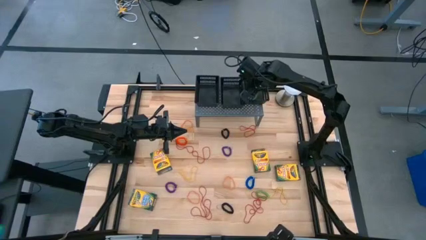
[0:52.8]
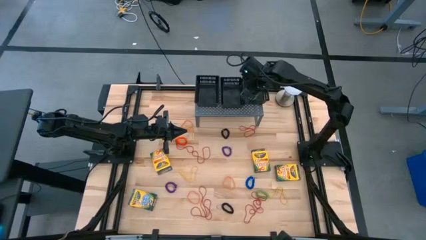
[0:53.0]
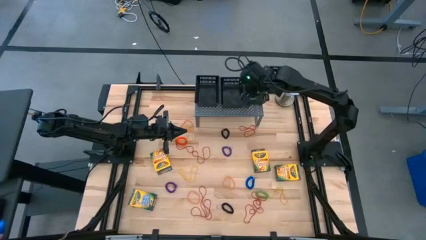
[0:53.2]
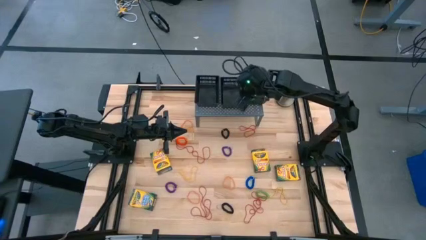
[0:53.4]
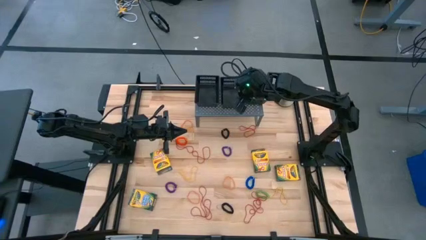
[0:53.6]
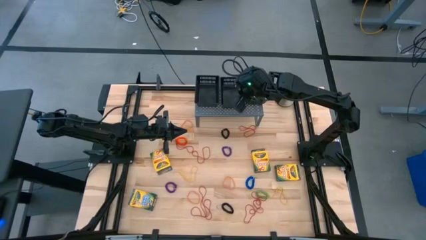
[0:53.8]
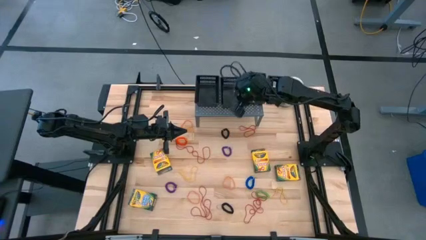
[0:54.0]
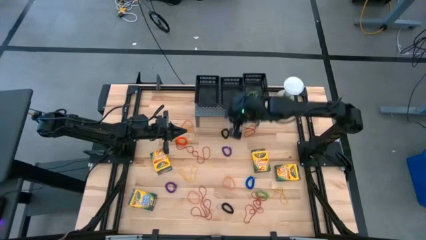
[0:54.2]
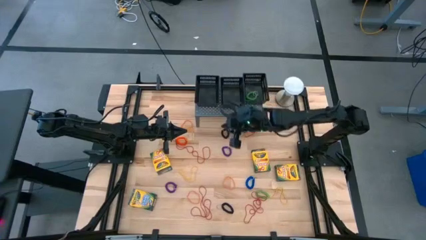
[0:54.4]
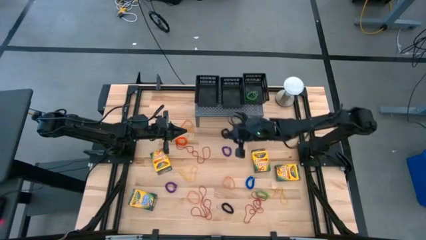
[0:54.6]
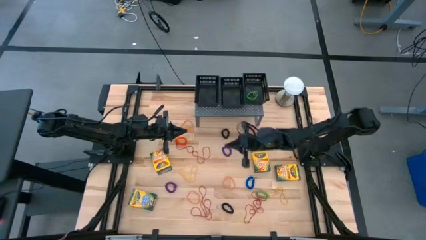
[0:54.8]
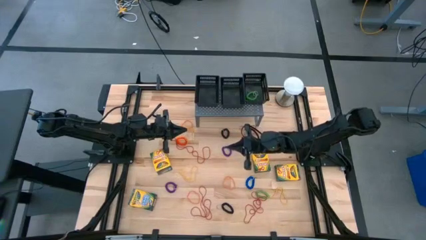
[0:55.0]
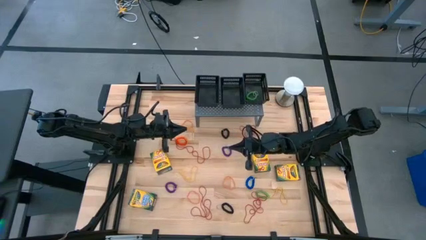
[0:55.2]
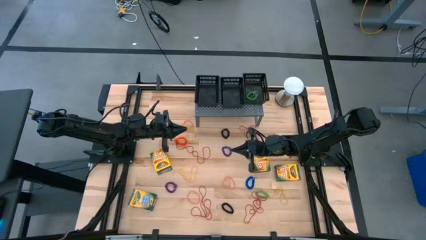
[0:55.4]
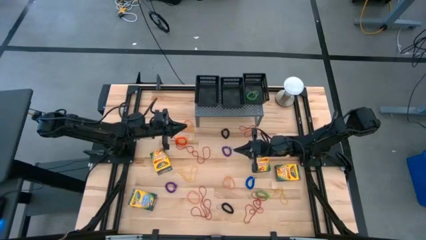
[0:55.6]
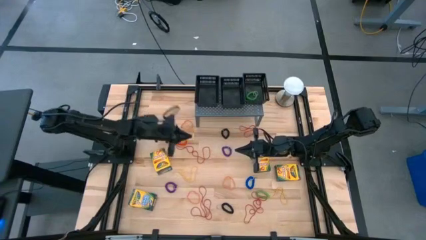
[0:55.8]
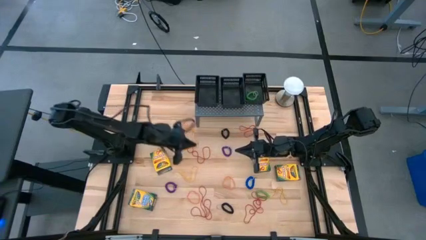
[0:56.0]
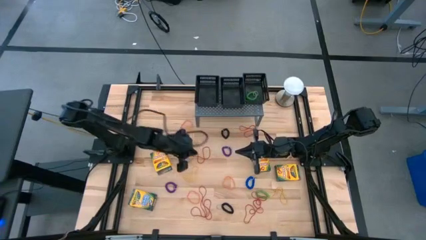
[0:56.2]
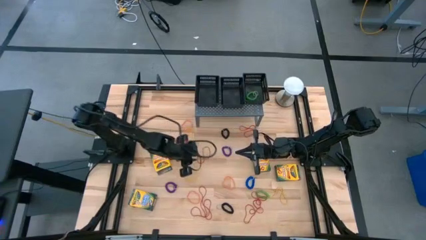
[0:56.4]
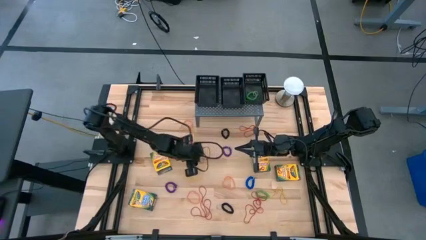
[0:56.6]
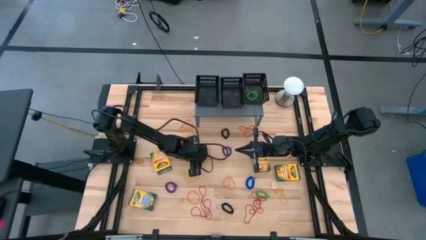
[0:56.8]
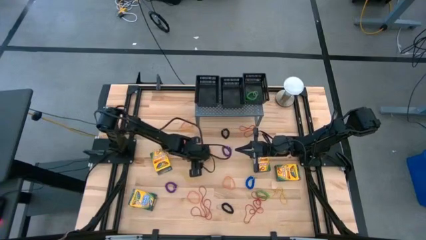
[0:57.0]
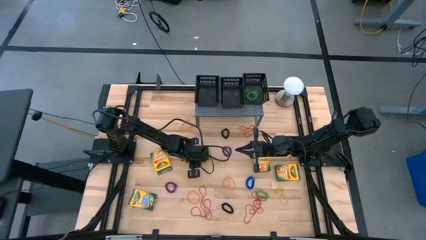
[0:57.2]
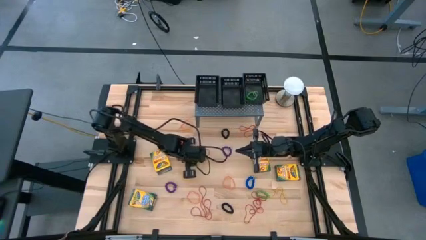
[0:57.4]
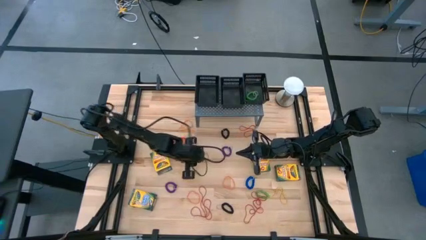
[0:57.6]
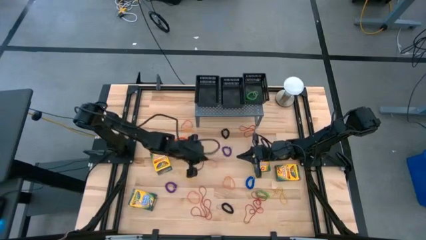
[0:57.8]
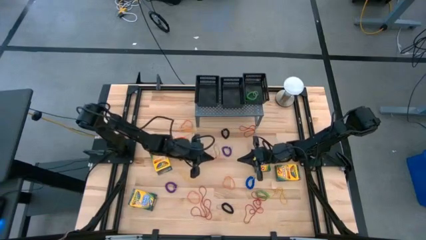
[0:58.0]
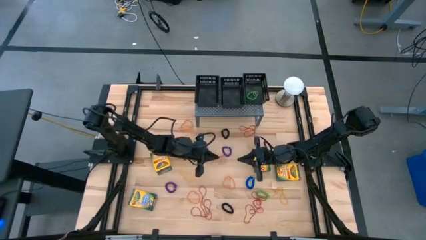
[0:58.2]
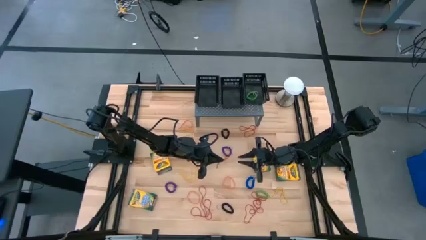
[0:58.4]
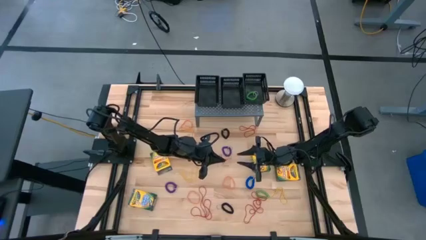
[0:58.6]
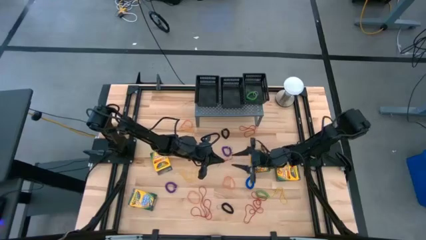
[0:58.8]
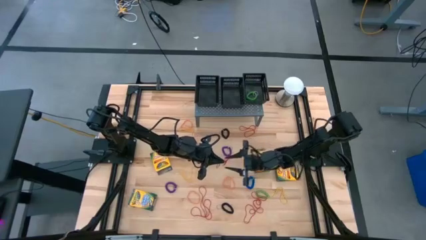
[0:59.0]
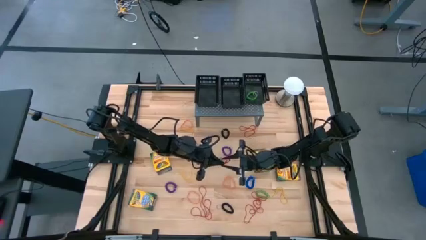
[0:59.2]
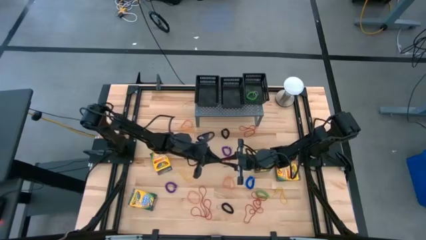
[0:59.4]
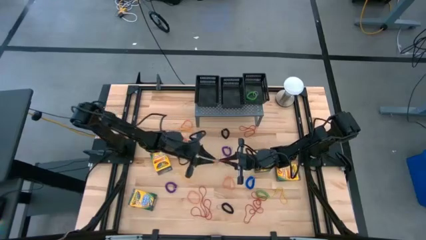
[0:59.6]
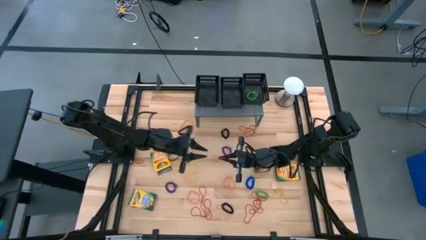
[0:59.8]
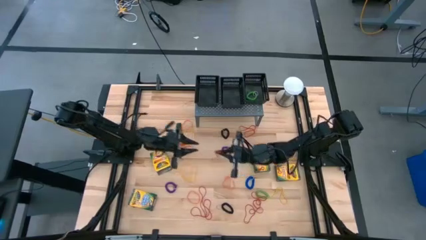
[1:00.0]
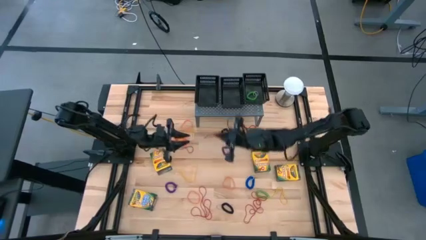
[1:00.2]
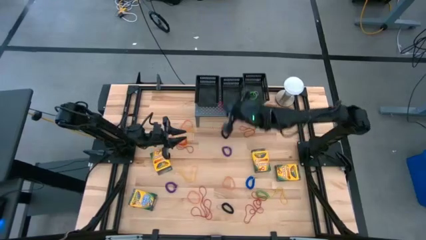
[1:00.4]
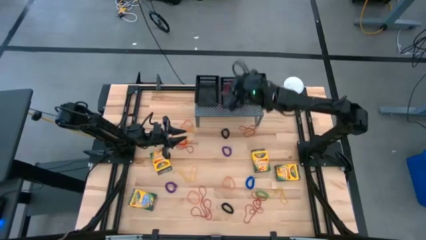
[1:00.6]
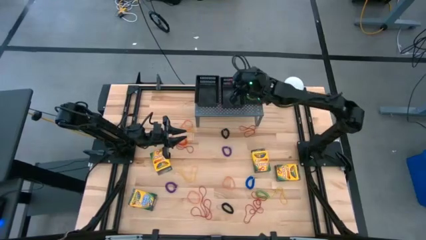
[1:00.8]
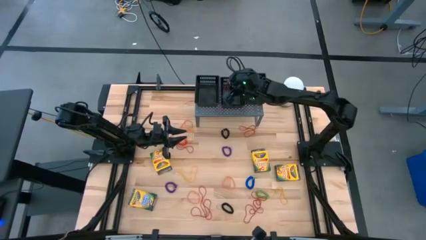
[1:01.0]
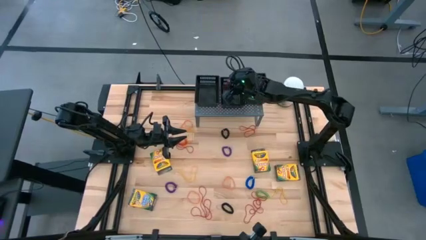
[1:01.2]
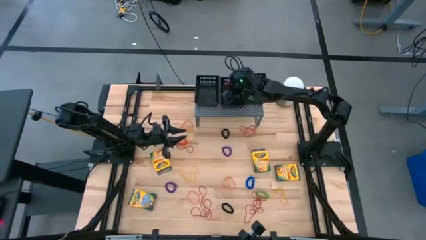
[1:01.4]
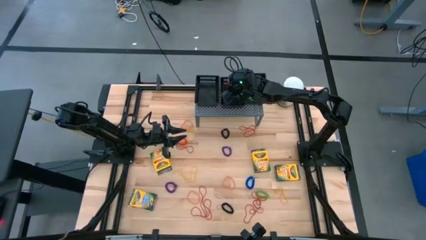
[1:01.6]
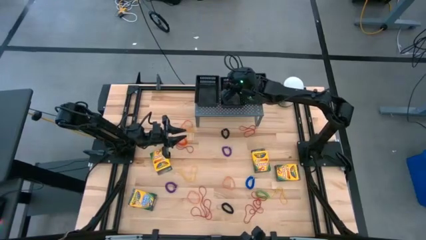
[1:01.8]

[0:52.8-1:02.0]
Task: Sort rubber bands into baskets
Put the red rubber band into the middle black black basket on the shelf

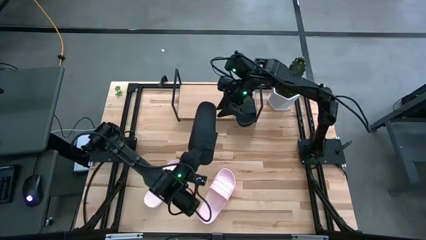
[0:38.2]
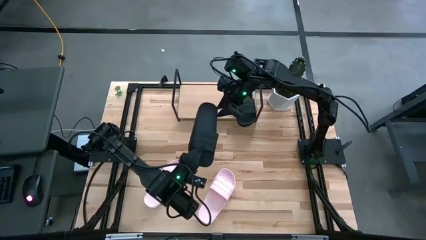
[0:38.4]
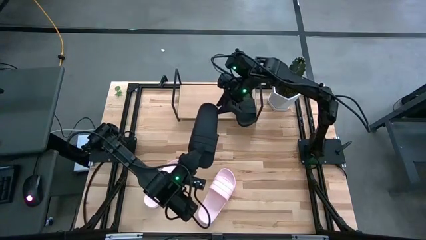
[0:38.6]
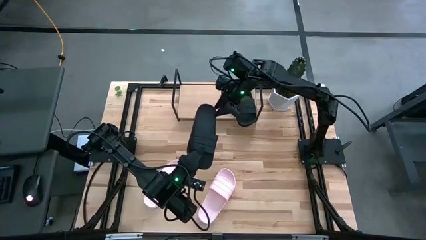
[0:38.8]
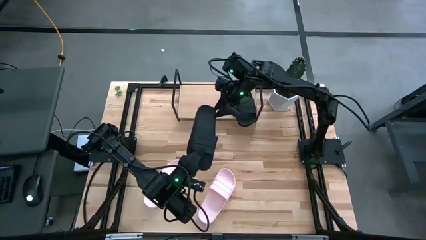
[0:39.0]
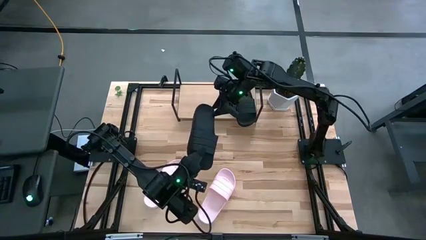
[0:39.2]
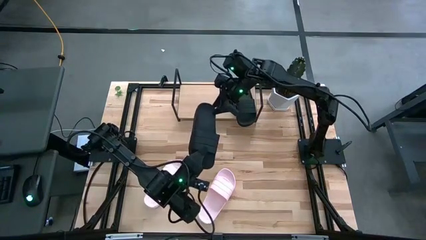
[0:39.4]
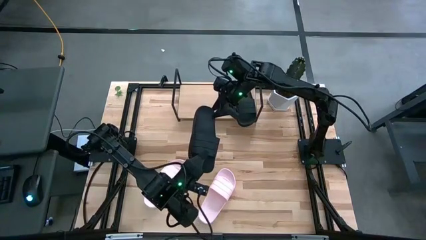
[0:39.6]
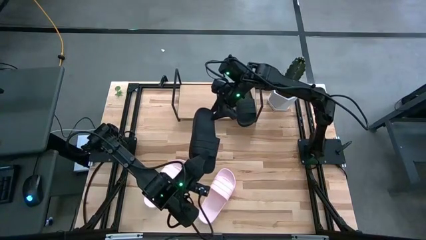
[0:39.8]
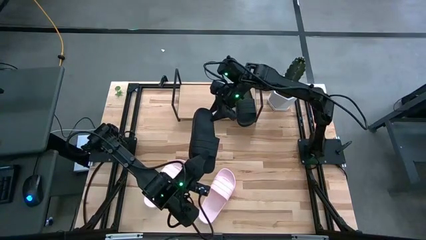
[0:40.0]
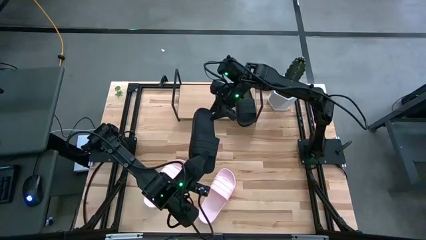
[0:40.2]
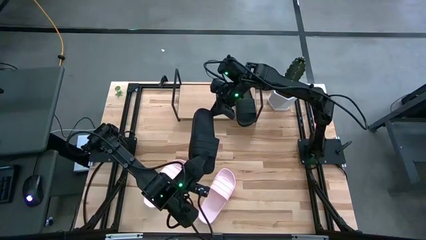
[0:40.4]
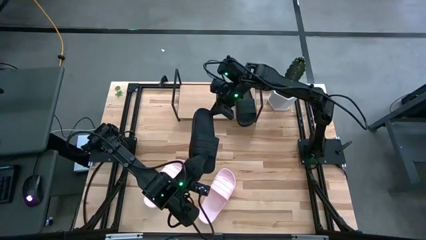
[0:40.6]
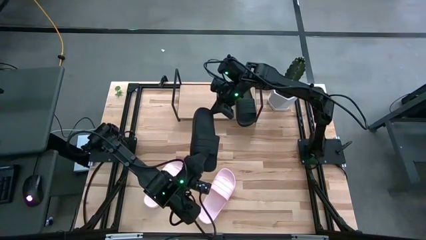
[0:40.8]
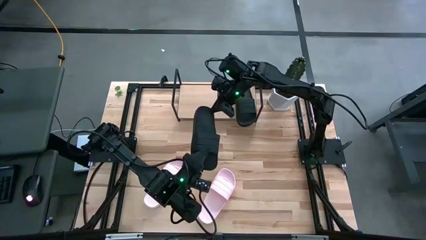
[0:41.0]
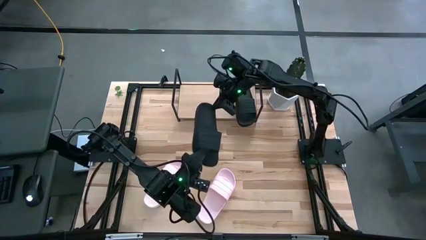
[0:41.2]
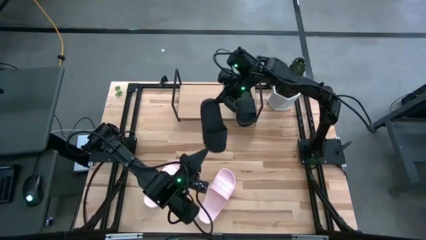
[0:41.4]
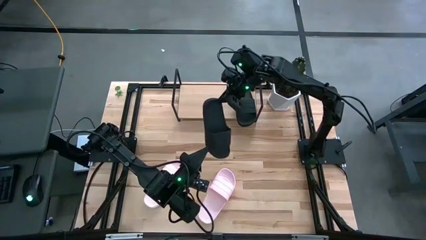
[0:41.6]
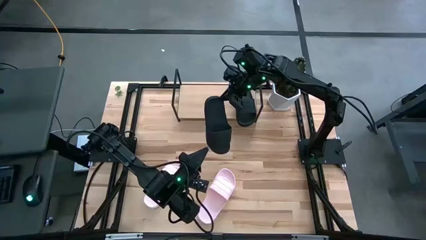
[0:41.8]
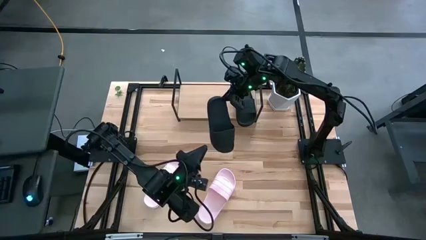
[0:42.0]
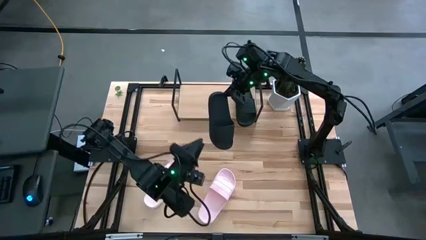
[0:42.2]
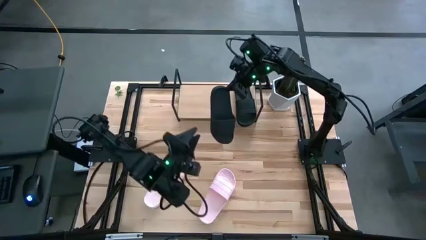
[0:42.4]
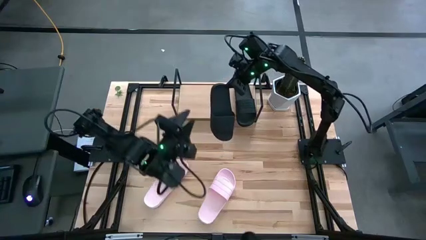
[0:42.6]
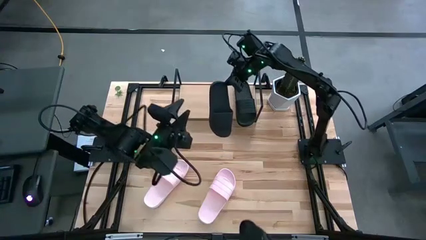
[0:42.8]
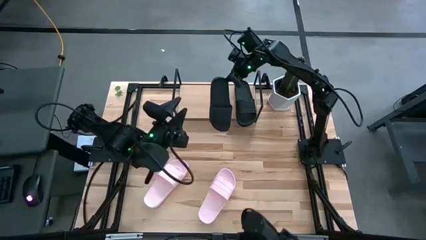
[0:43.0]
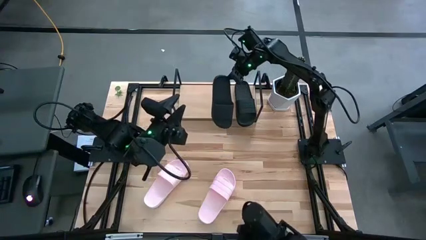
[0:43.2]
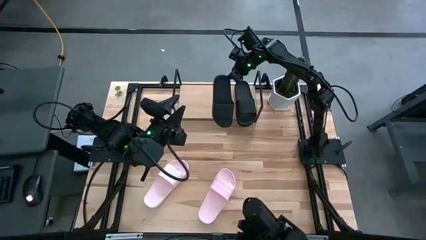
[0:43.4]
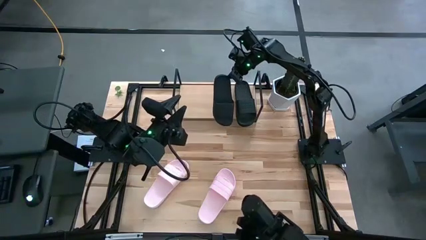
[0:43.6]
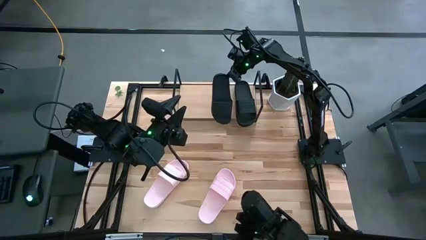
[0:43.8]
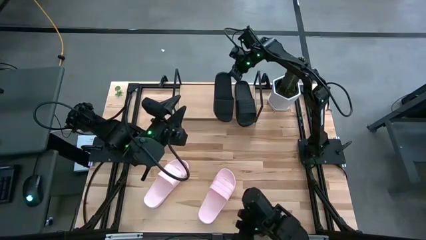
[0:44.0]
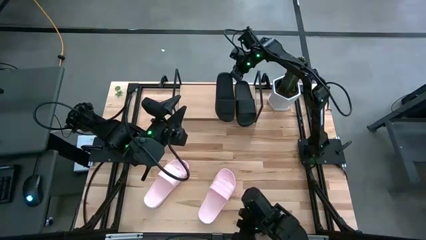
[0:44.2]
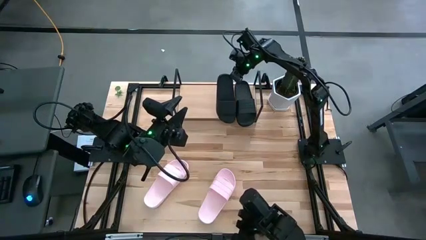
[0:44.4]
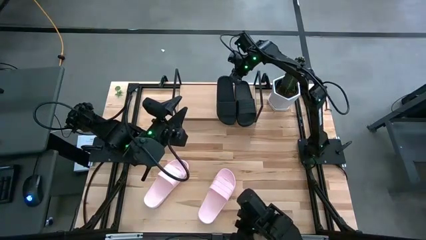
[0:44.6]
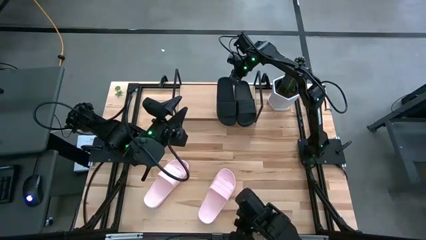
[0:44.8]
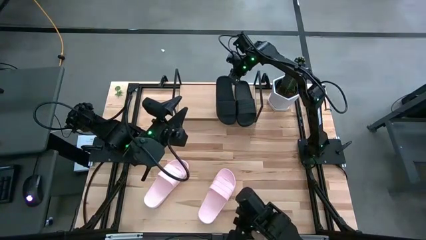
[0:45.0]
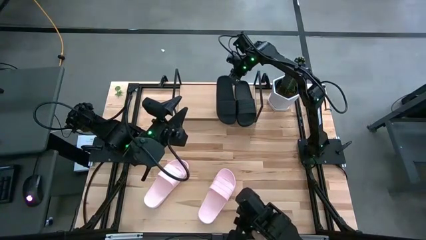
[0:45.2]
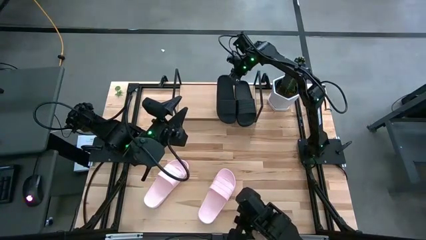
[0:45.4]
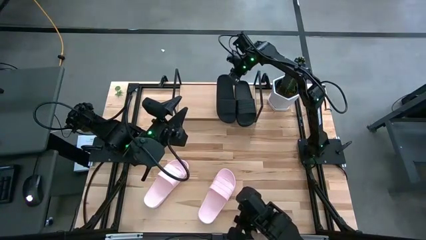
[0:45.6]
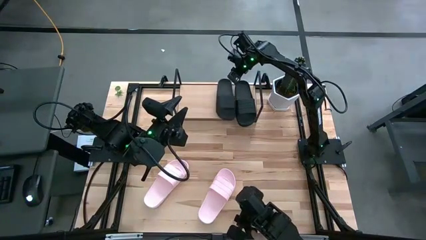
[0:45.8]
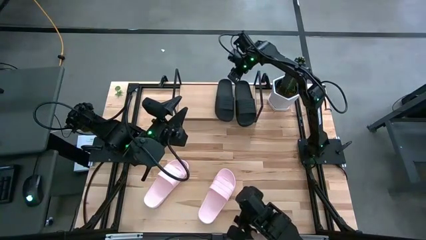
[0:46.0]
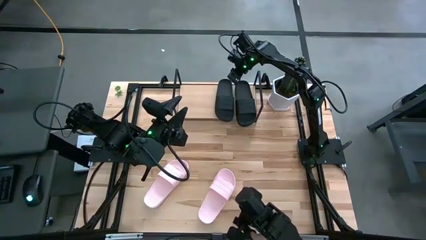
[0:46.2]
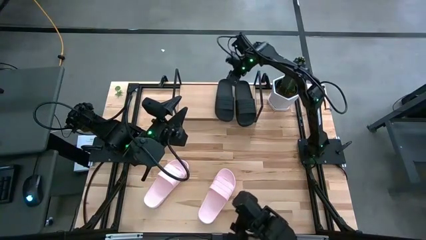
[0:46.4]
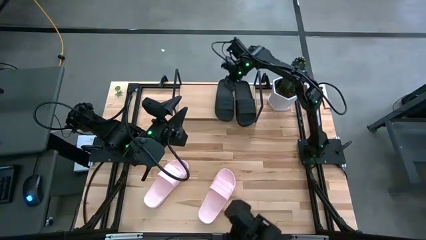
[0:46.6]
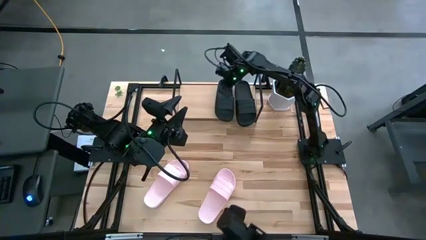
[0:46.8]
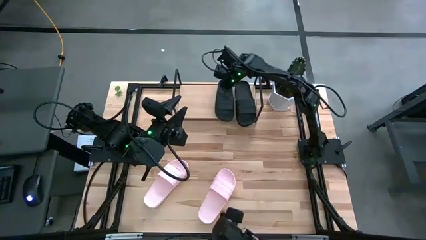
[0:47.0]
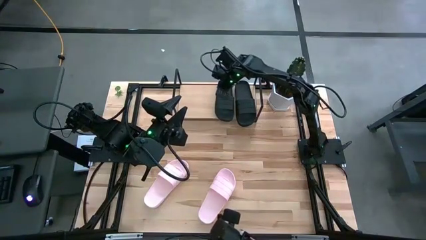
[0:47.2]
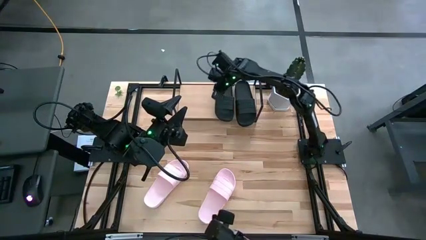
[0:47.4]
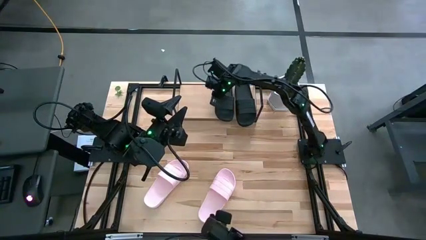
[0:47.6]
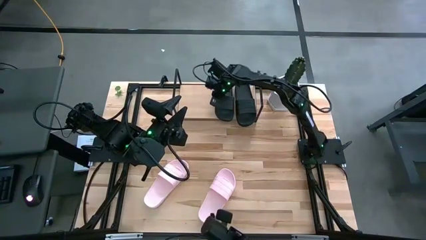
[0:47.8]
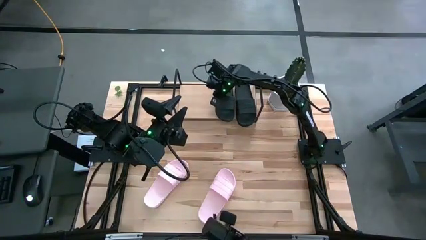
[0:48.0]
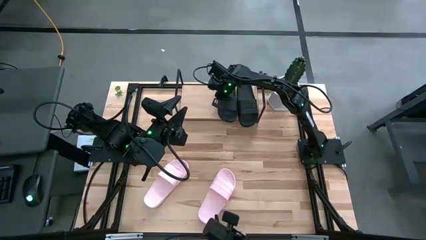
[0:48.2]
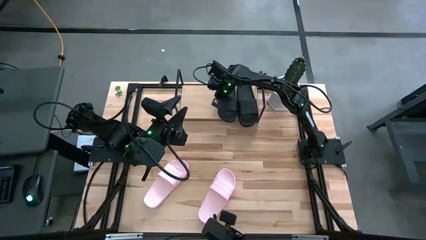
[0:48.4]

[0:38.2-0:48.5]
Task: Pick and place slides into the shelf
Put the black slide on the shelf
